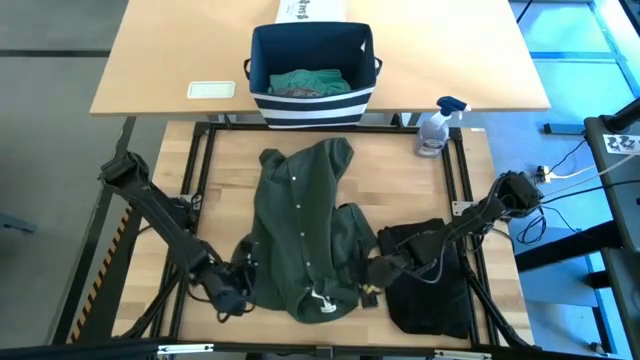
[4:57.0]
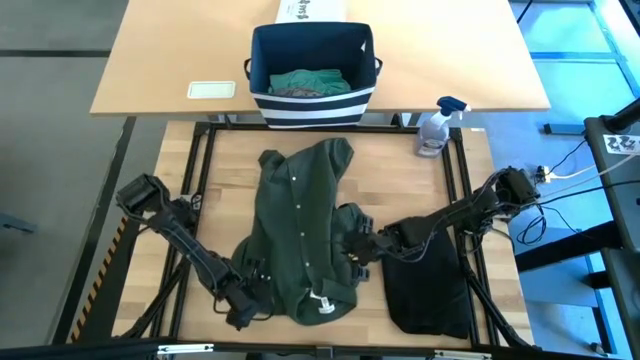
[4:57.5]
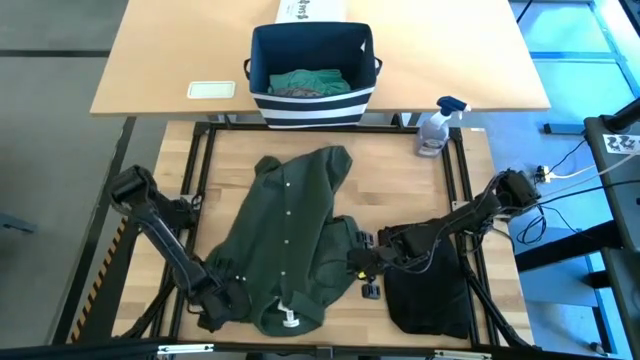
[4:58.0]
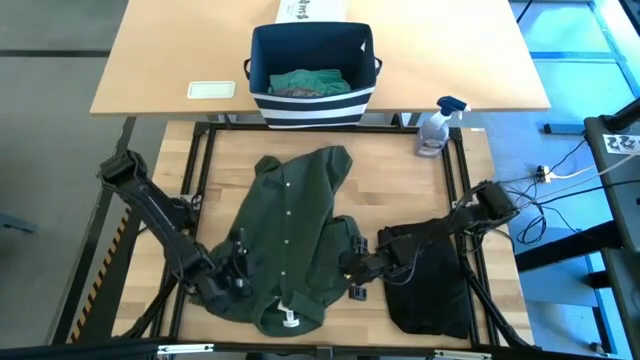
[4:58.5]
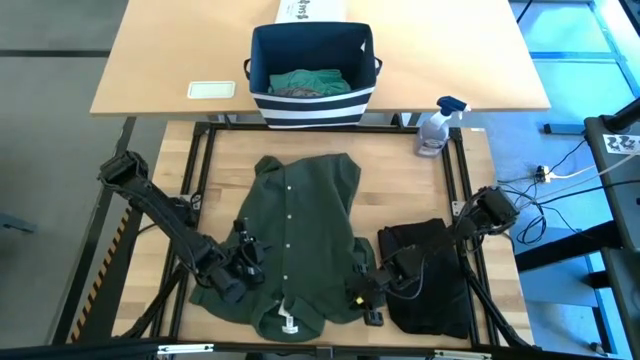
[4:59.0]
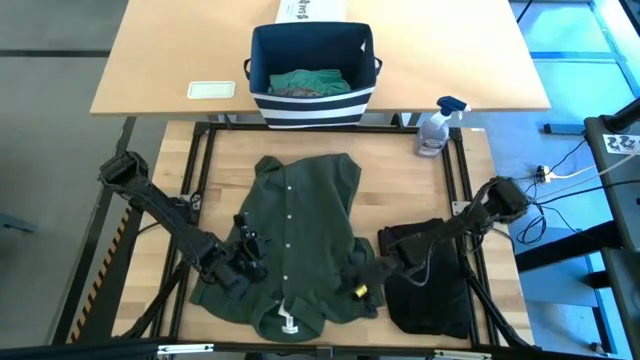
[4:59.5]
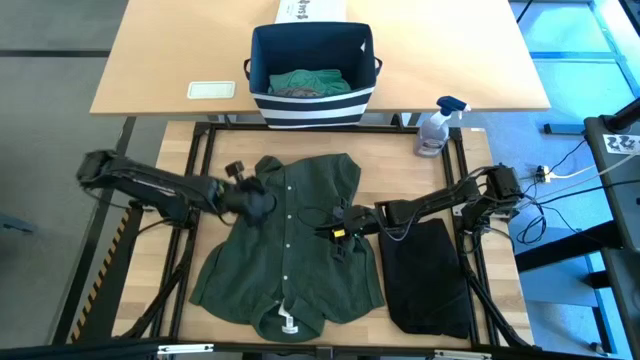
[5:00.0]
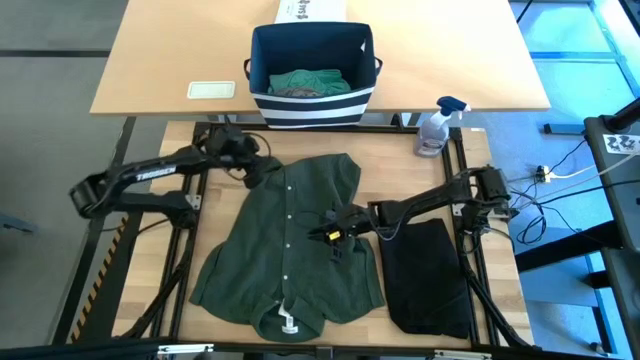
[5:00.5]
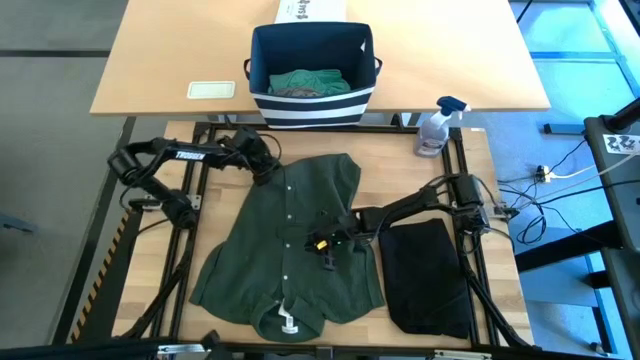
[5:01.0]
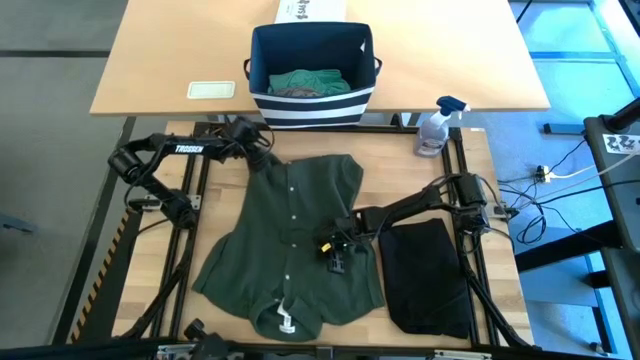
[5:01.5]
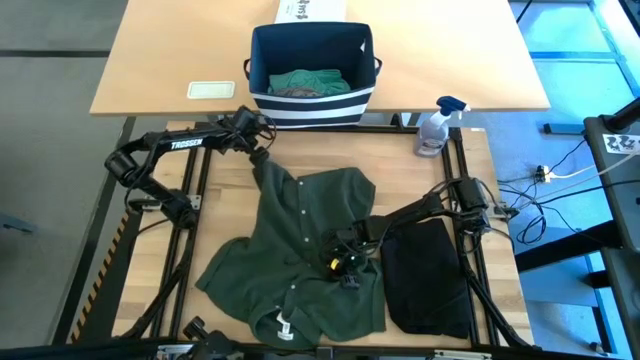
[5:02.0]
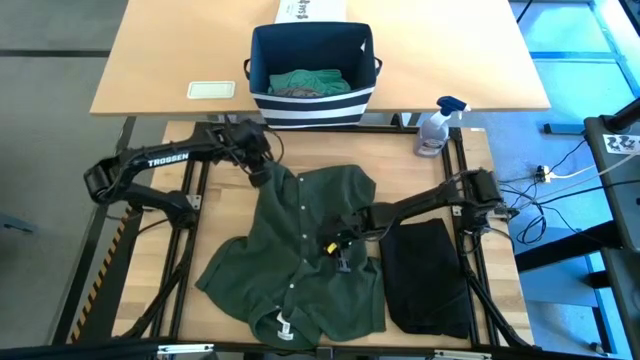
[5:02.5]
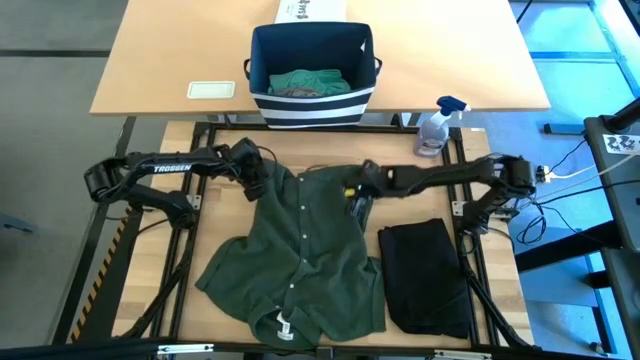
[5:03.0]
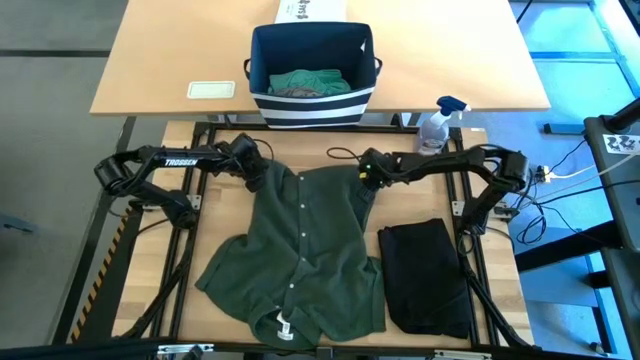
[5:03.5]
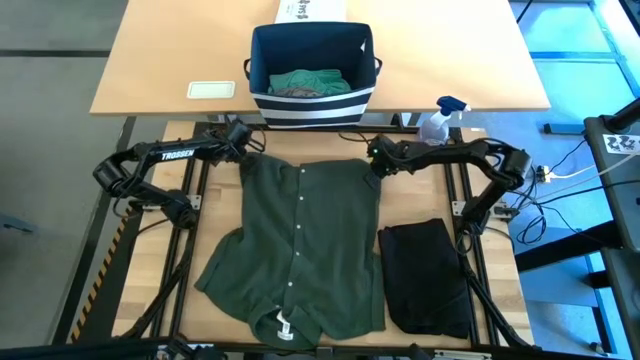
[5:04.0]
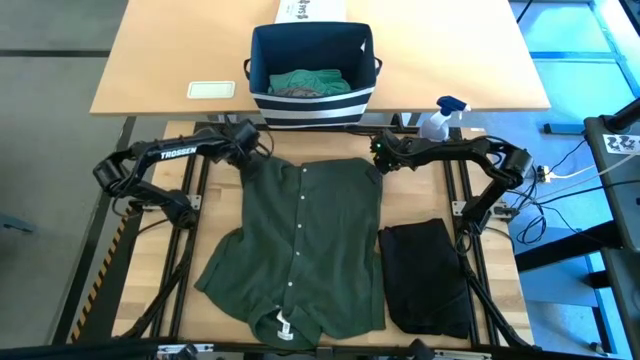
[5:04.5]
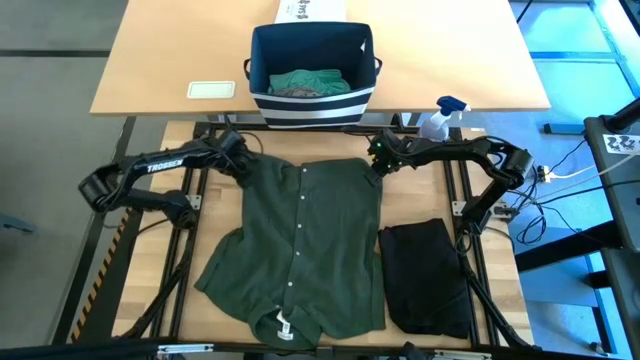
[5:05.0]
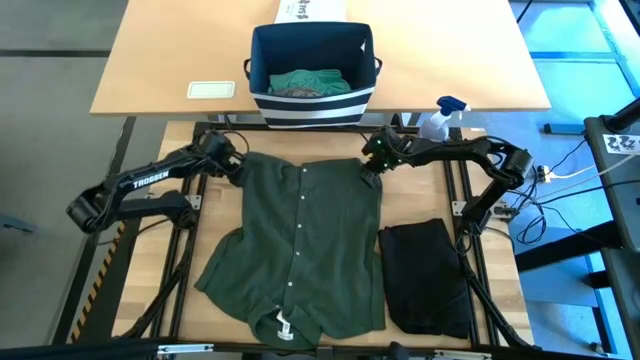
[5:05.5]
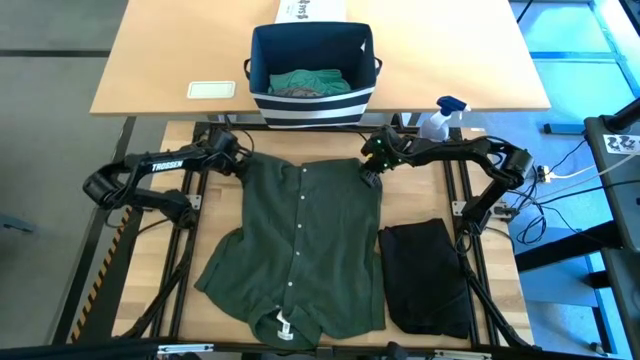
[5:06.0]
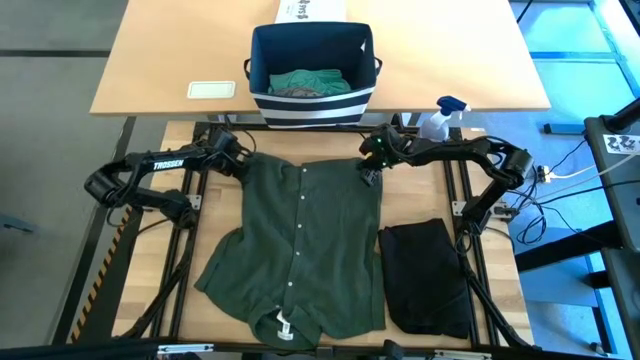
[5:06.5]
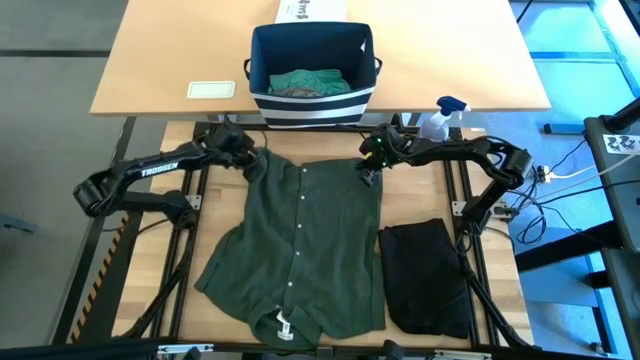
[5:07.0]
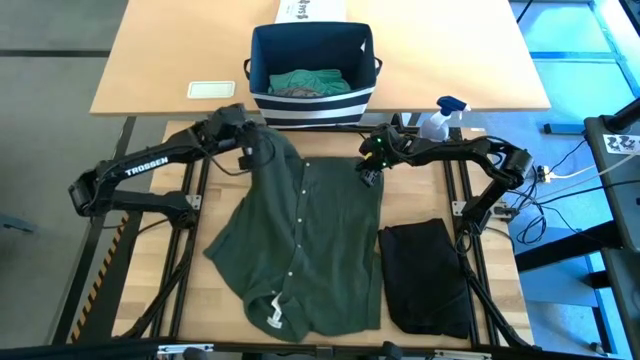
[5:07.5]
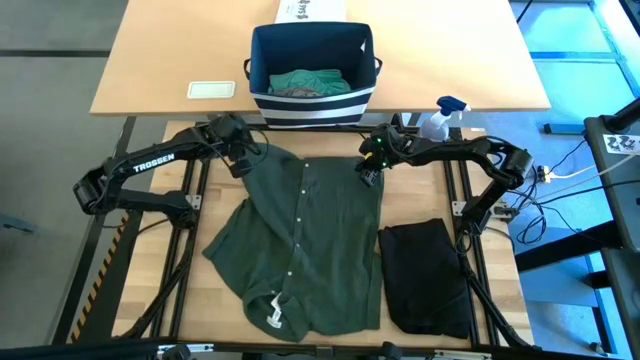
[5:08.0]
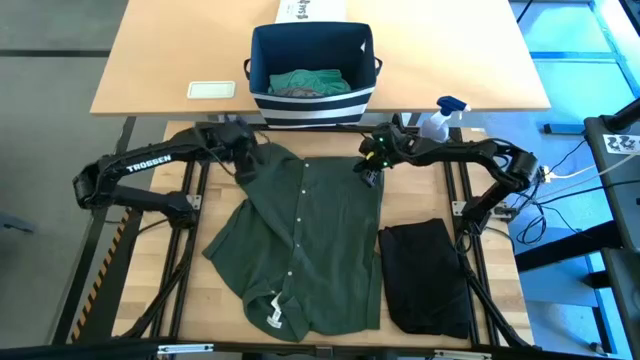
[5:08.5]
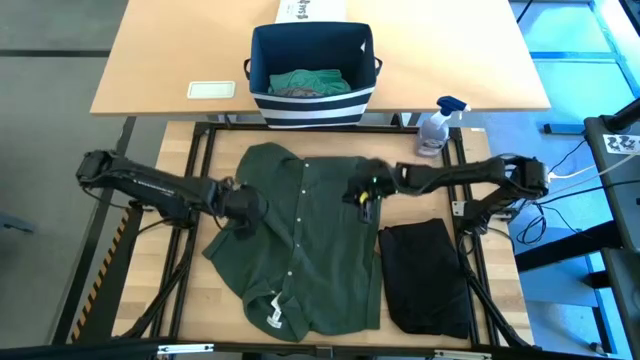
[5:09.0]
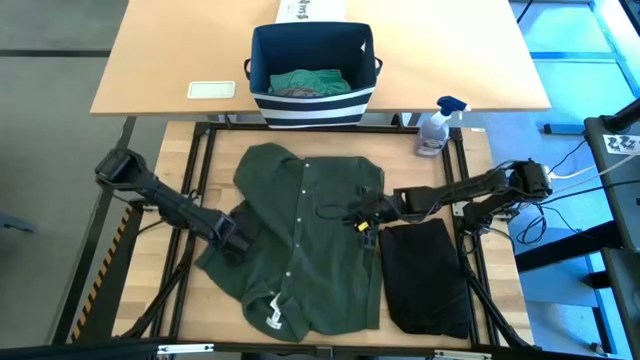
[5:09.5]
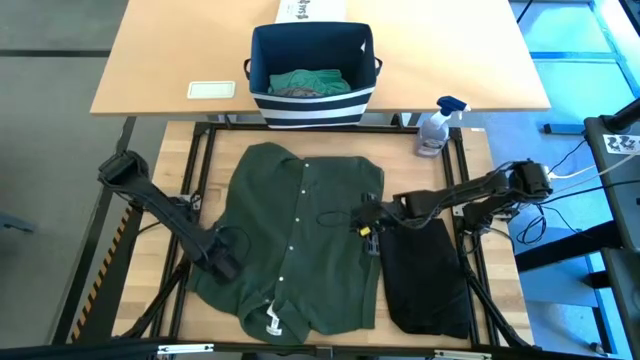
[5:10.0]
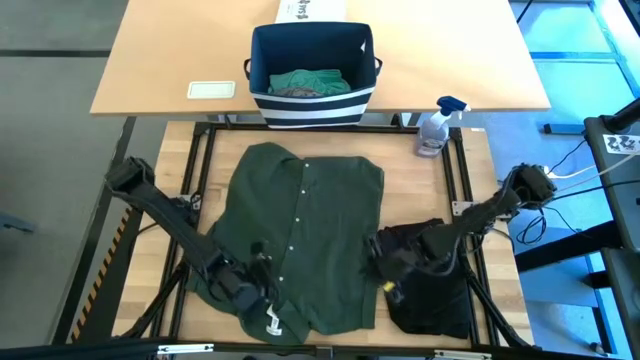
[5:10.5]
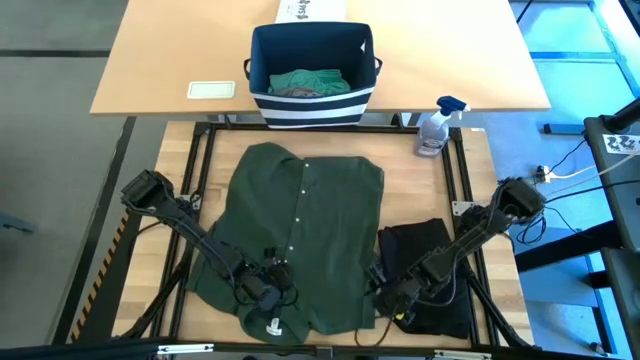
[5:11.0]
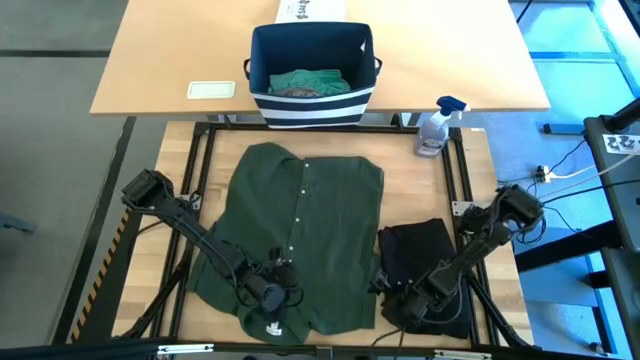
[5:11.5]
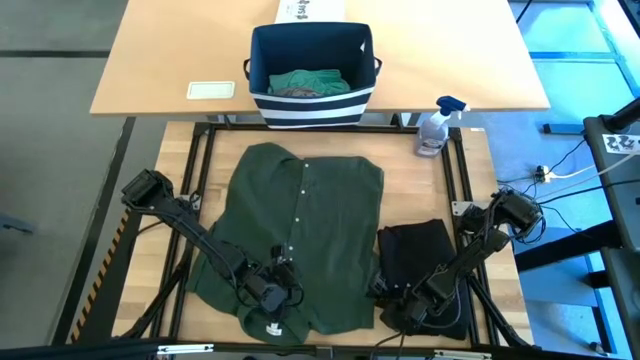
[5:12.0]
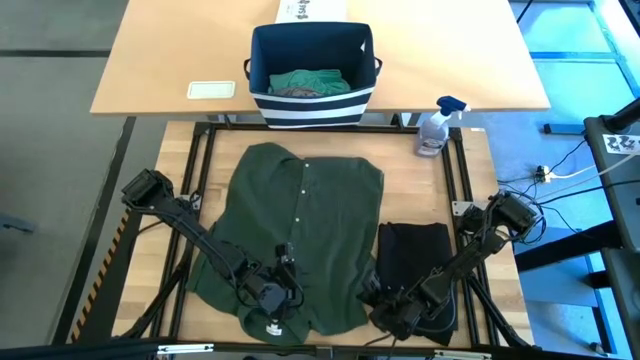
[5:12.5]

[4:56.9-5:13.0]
Task: Fold Laundry from Bin
Fold the green polo shirt

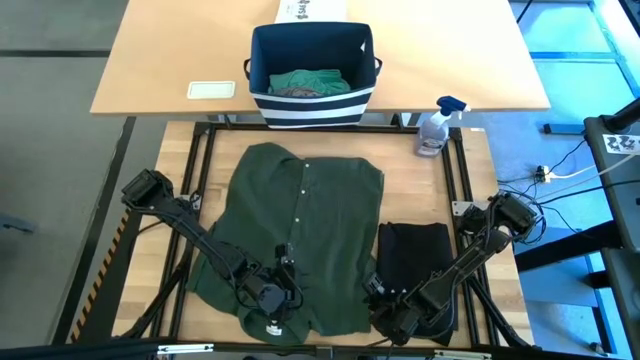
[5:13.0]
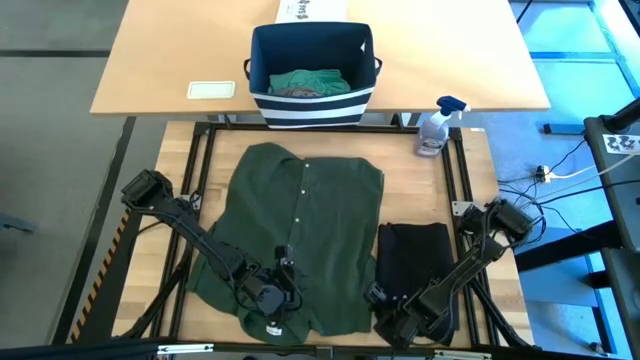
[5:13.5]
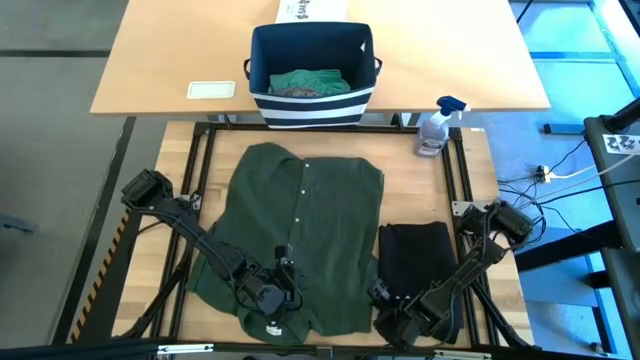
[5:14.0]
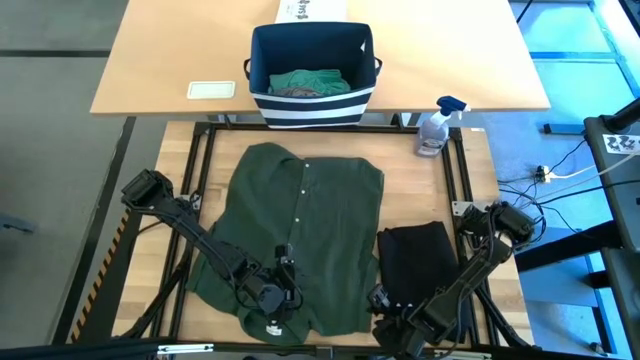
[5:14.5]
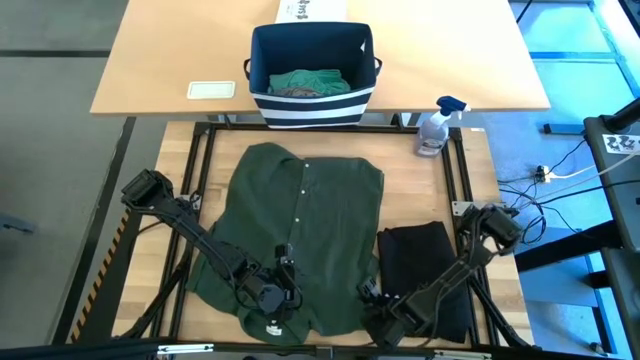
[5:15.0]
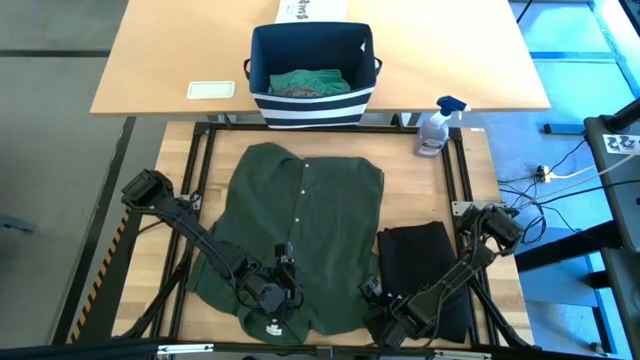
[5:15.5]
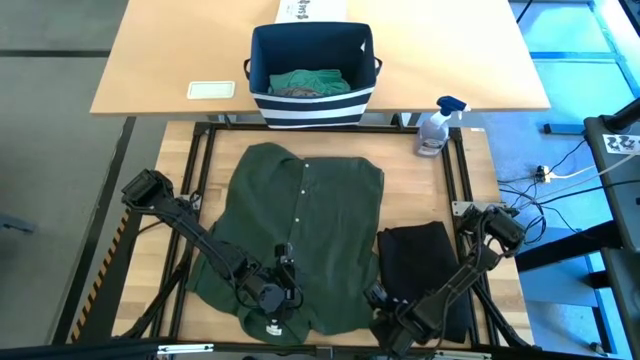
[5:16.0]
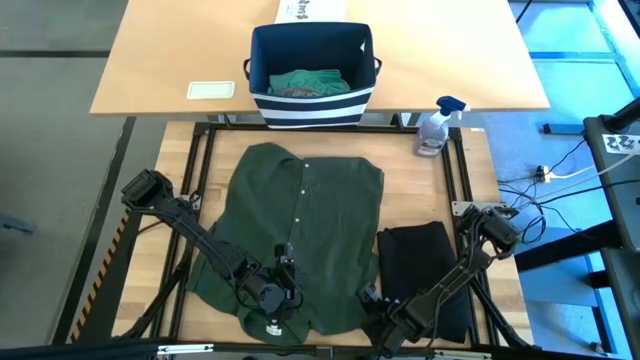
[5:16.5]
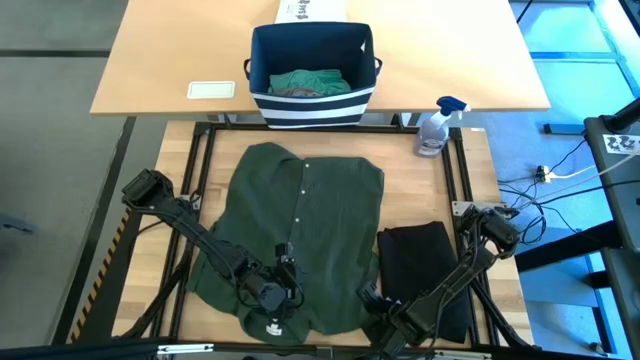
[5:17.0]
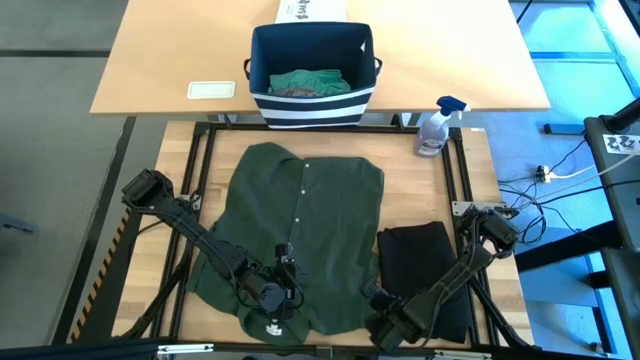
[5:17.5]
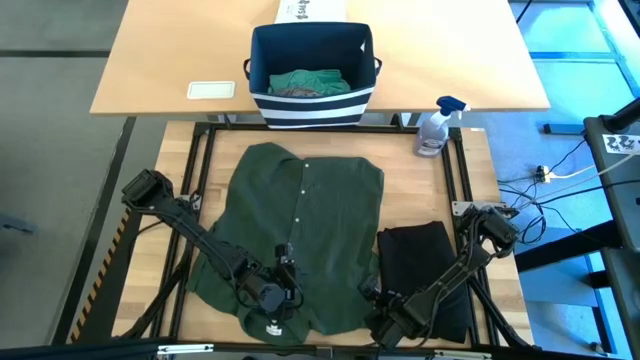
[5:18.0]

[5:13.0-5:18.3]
Fold the green polo shirt
